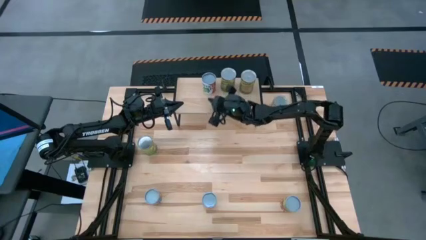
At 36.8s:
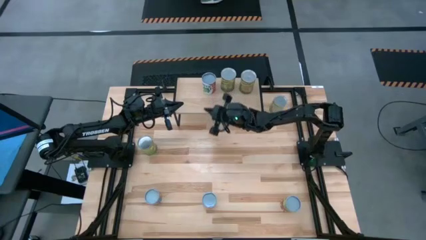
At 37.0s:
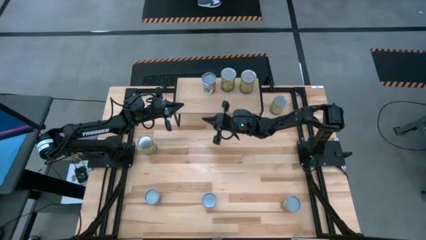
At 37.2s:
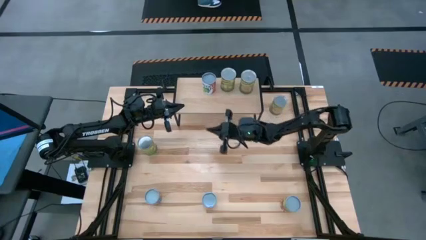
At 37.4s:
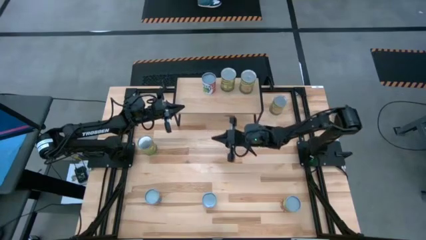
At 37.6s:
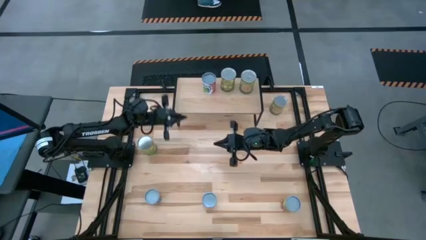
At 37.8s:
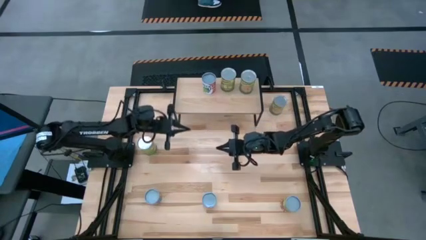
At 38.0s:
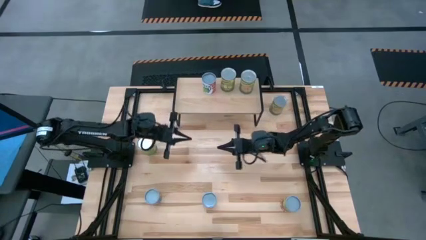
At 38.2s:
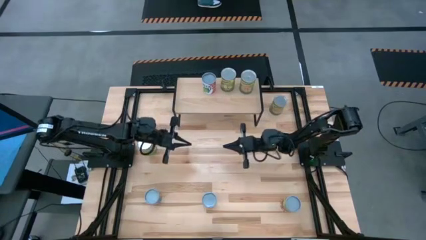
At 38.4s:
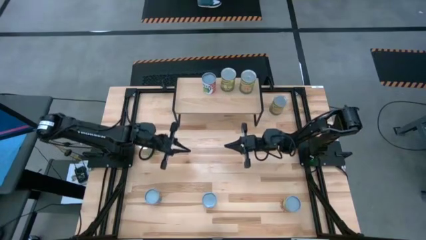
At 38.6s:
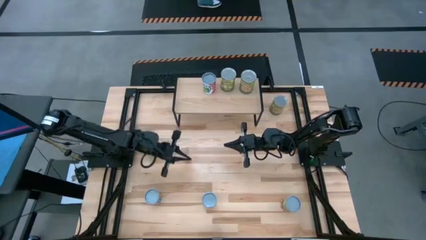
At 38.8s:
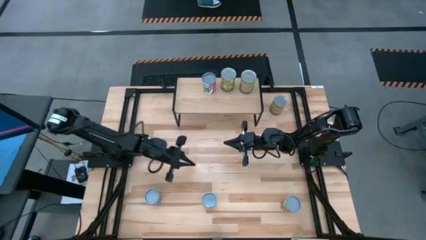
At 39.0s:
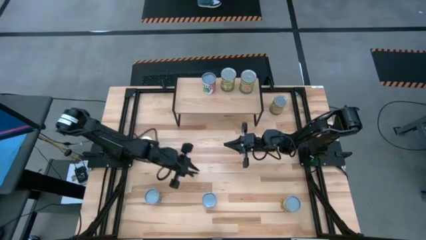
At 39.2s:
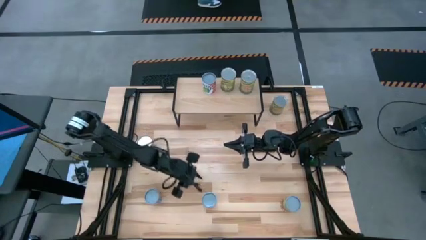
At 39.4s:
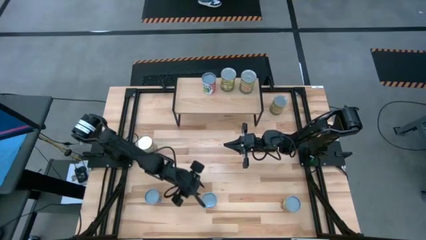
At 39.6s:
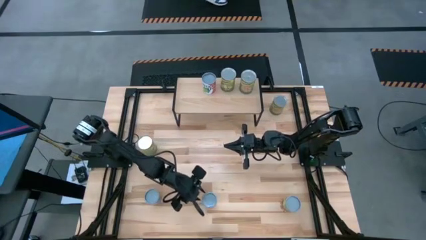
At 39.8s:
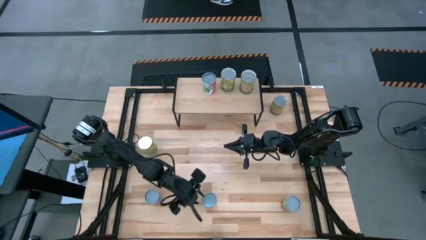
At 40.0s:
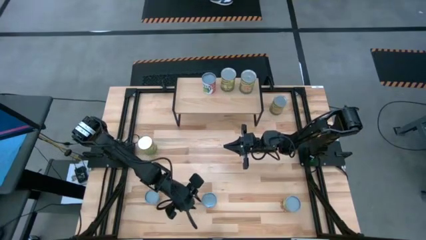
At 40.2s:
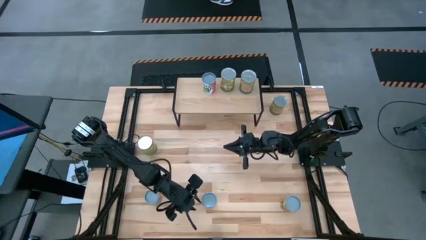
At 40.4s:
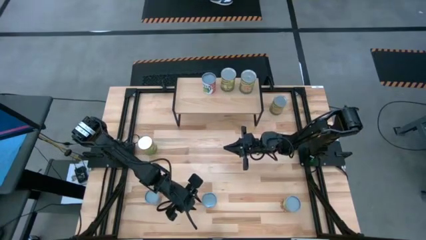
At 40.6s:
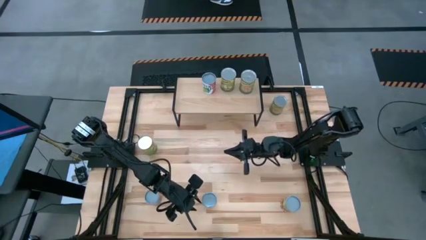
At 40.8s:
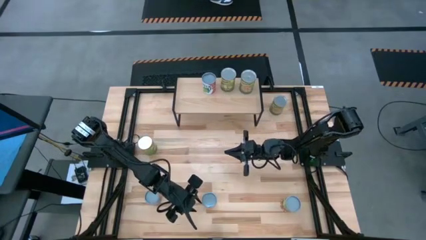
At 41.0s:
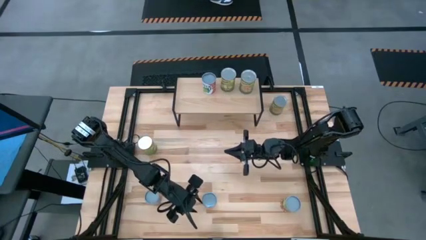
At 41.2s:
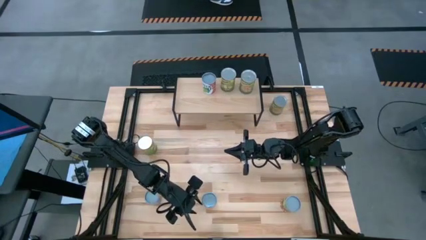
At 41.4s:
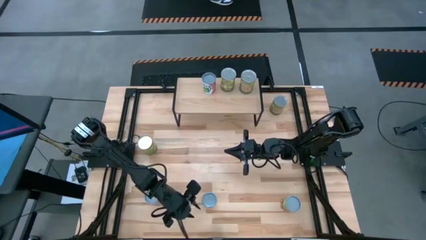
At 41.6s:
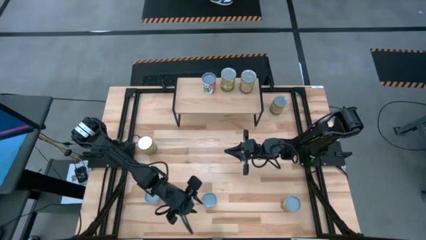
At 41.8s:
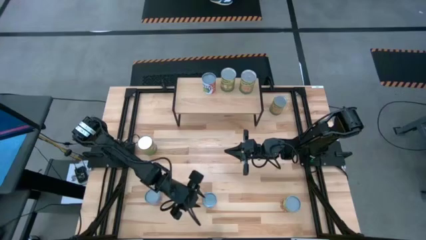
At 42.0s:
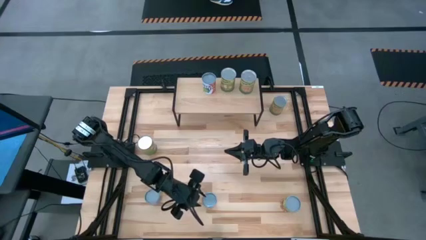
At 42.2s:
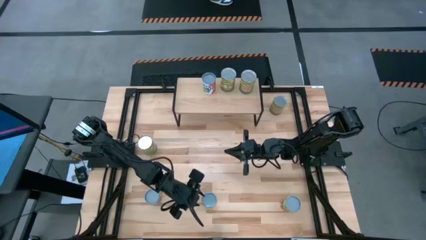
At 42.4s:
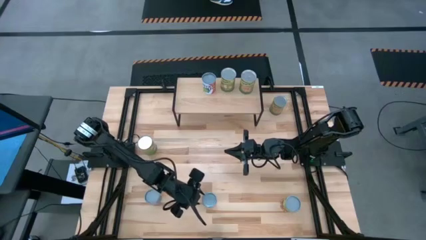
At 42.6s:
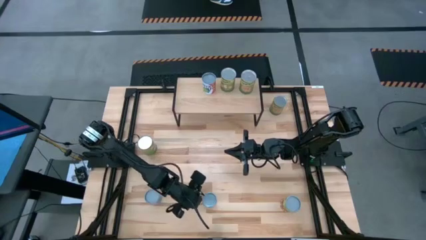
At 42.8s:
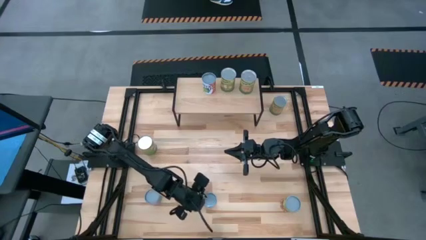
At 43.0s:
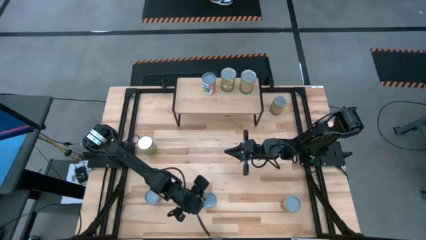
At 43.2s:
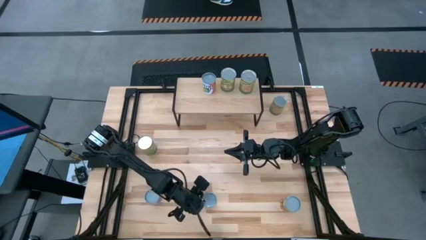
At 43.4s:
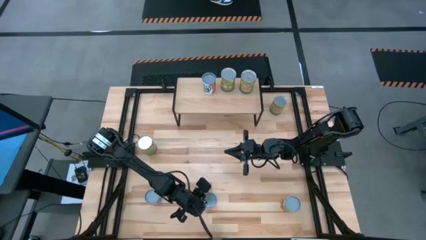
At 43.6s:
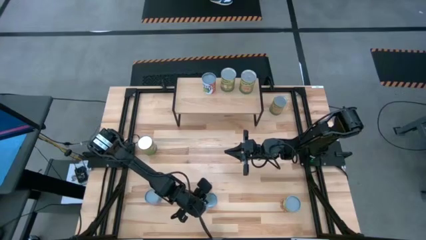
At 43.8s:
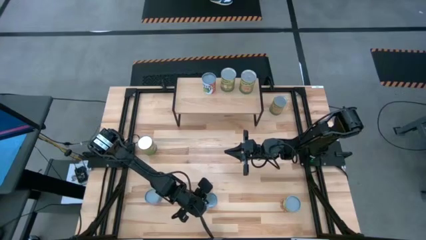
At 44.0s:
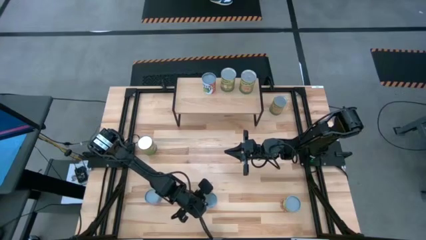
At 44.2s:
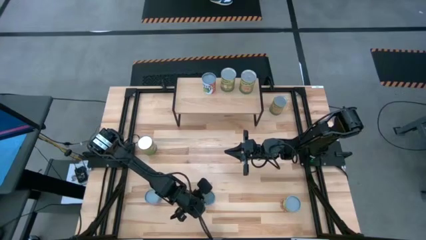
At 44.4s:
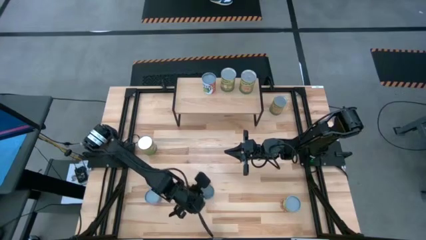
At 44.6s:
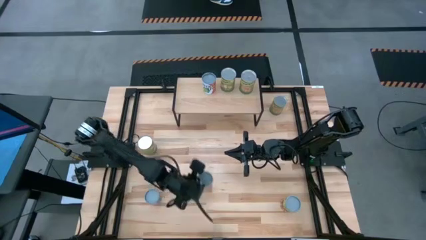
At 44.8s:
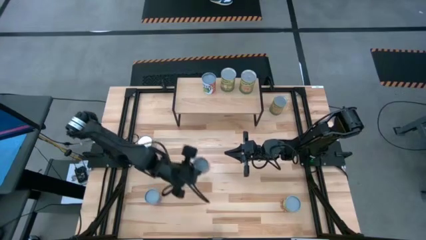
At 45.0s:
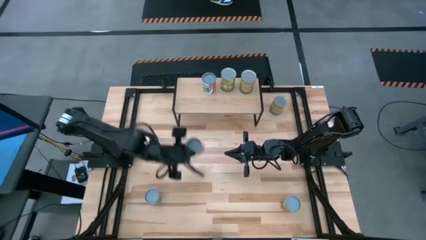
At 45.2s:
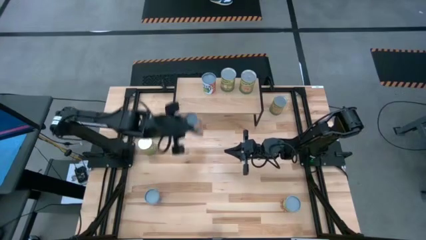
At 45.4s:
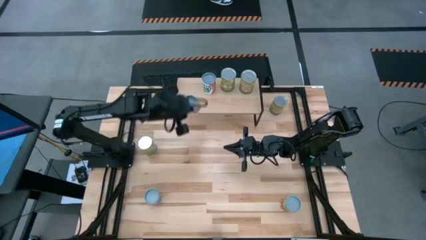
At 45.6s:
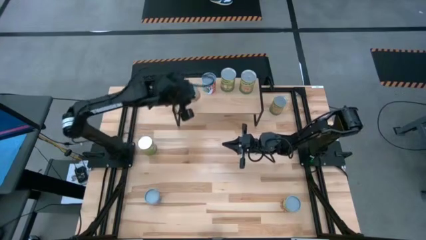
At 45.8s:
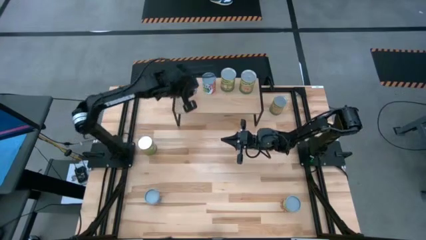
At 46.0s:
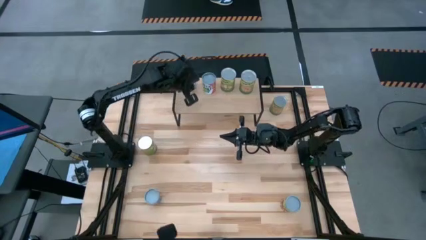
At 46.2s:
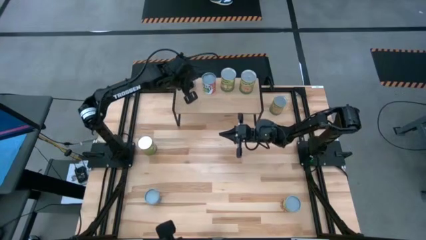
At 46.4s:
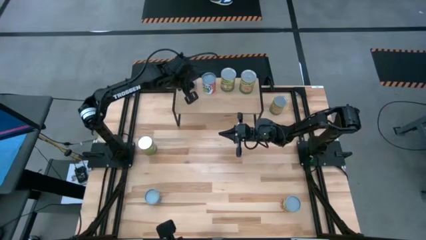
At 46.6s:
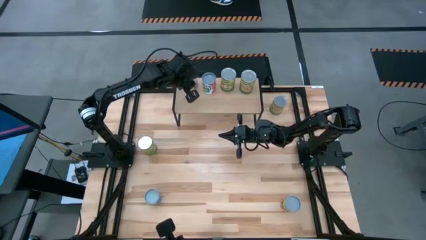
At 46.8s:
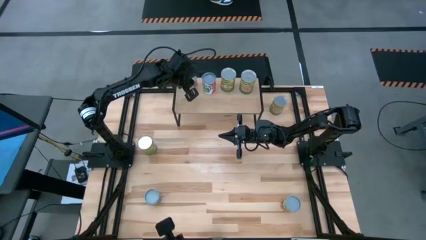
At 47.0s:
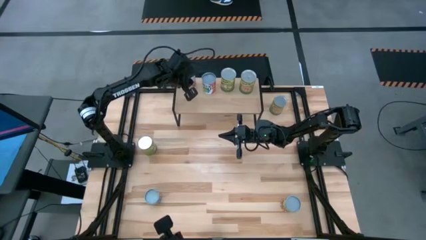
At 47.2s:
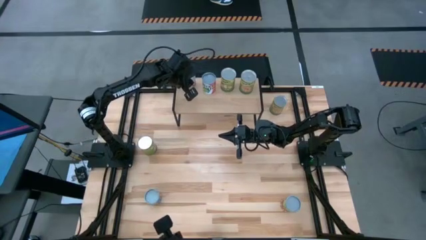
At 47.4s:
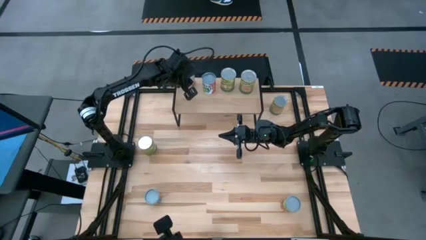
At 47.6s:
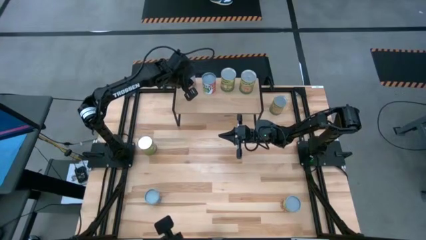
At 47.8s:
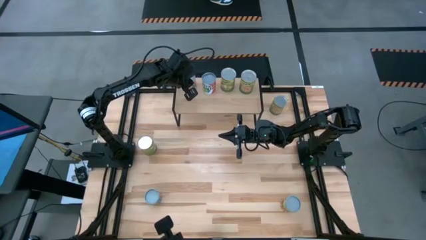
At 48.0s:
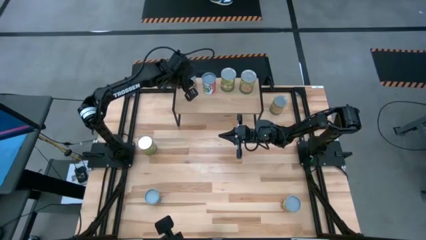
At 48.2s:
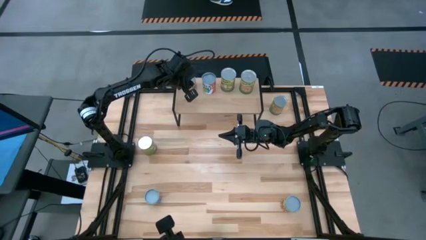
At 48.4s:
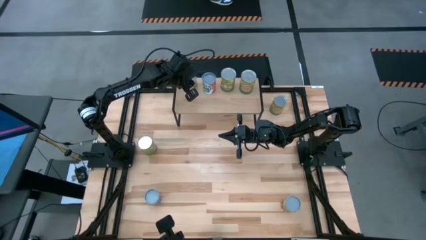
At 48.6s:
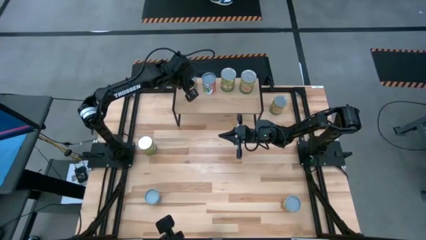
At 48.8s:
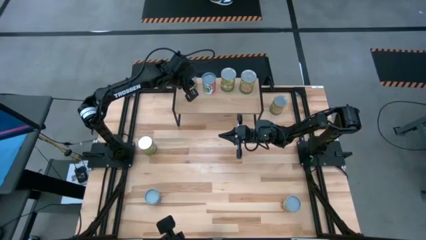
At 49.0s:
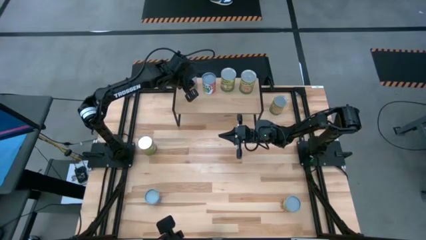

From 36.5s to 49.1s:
Task: Pick and place cans onto a shelf
Put the small canned oranges on the shelf
